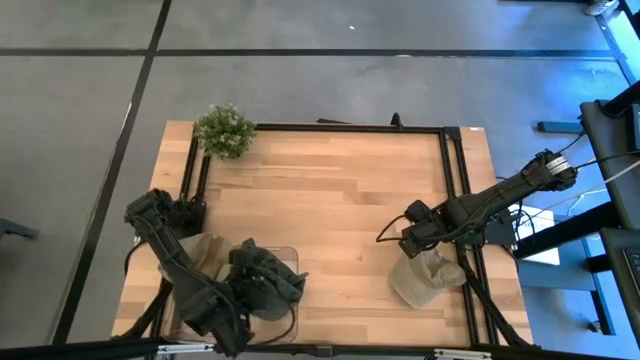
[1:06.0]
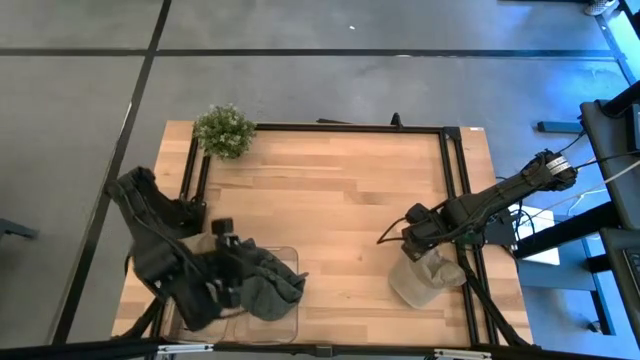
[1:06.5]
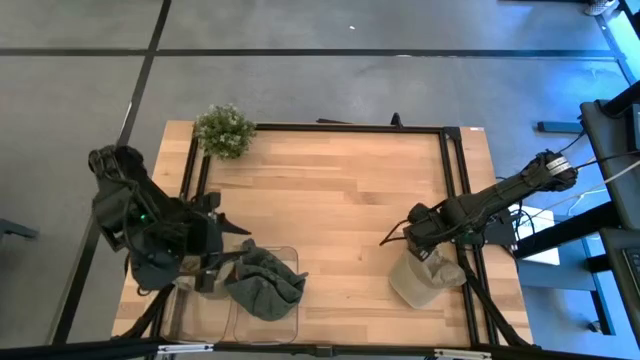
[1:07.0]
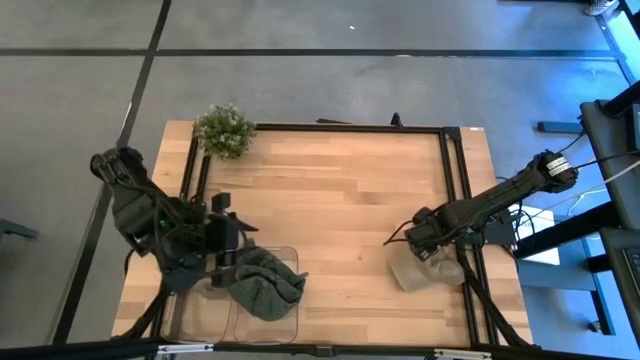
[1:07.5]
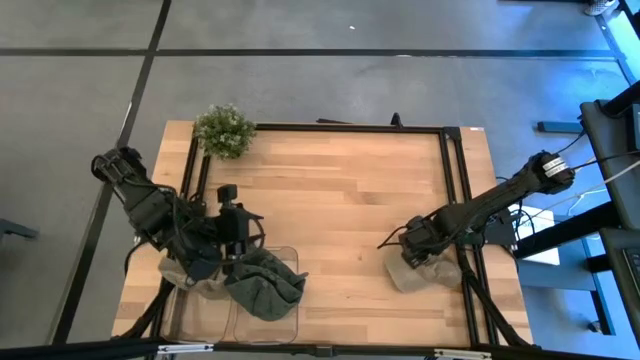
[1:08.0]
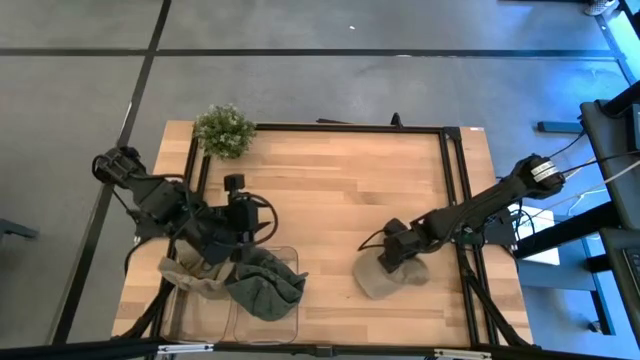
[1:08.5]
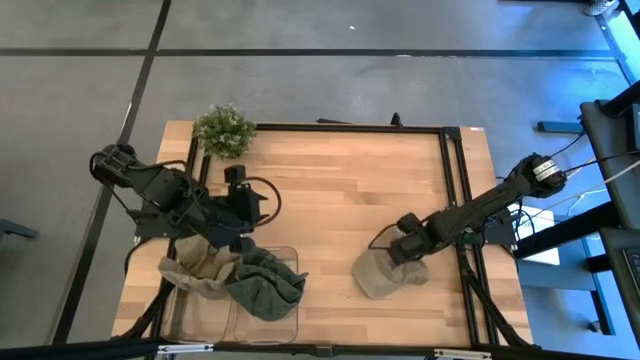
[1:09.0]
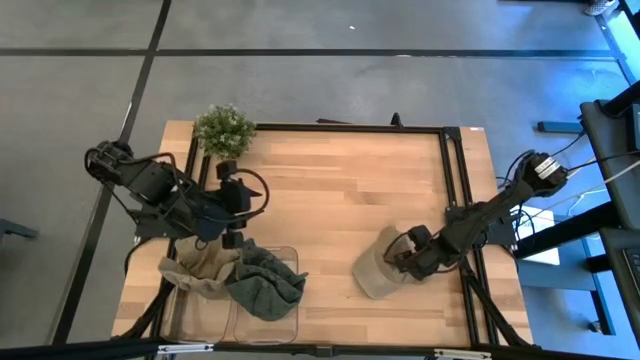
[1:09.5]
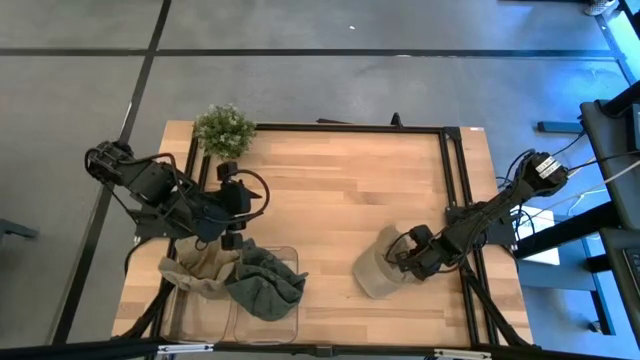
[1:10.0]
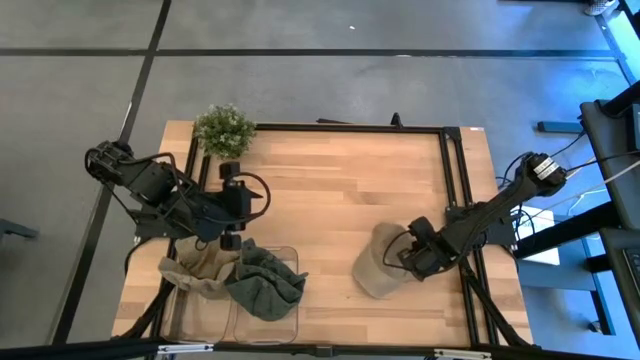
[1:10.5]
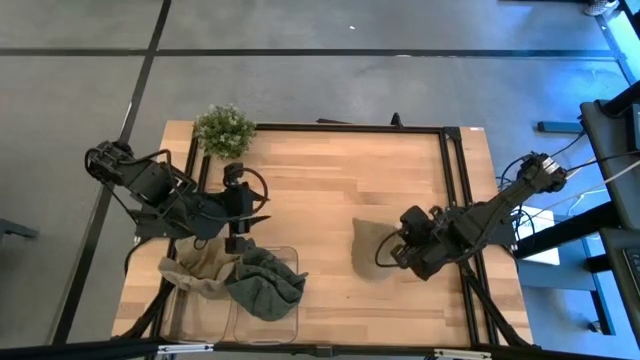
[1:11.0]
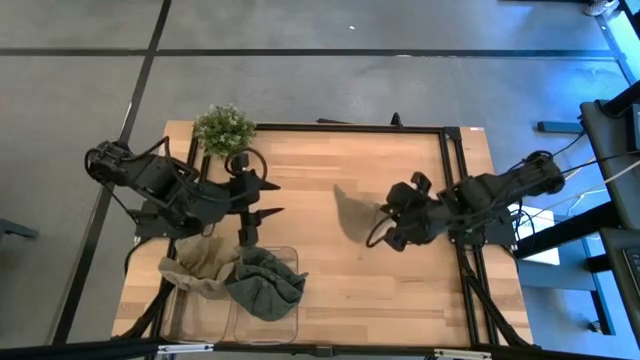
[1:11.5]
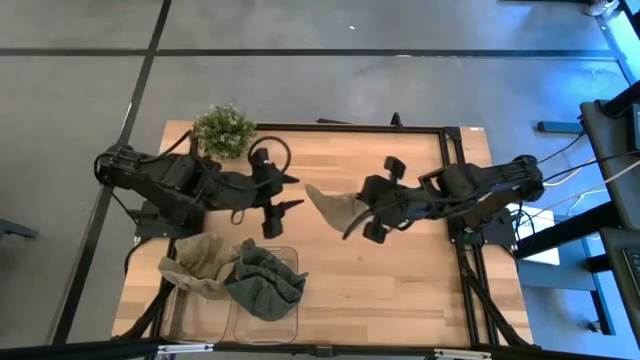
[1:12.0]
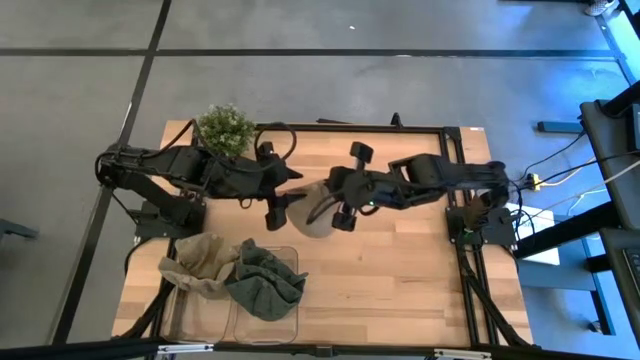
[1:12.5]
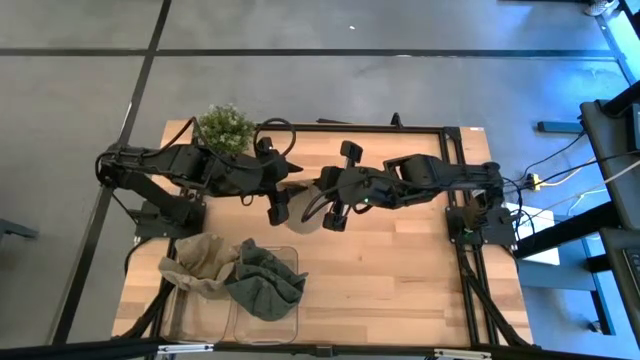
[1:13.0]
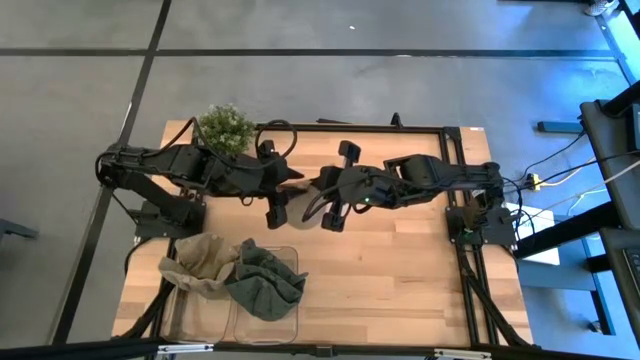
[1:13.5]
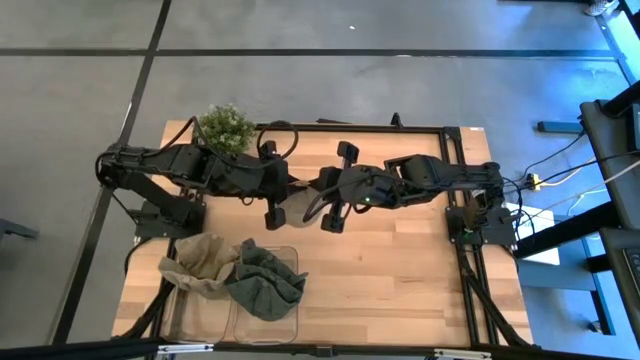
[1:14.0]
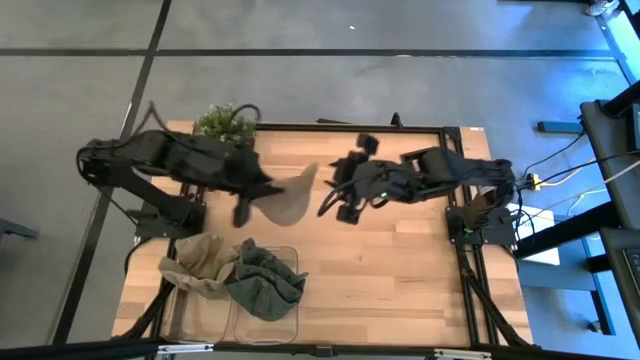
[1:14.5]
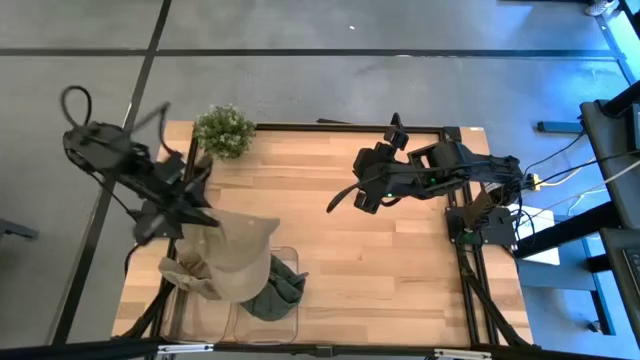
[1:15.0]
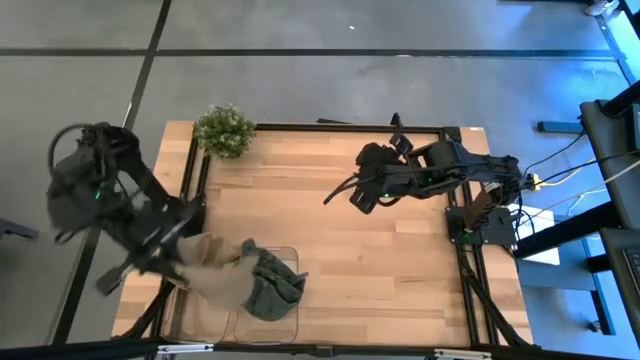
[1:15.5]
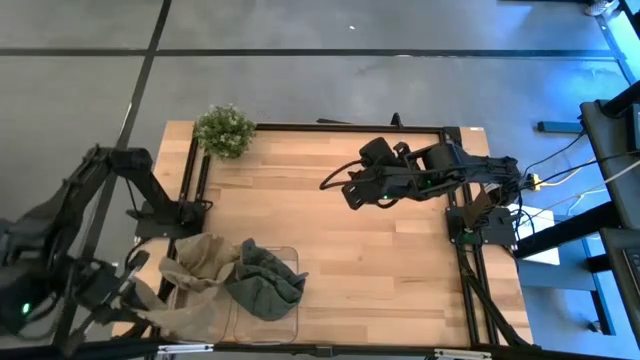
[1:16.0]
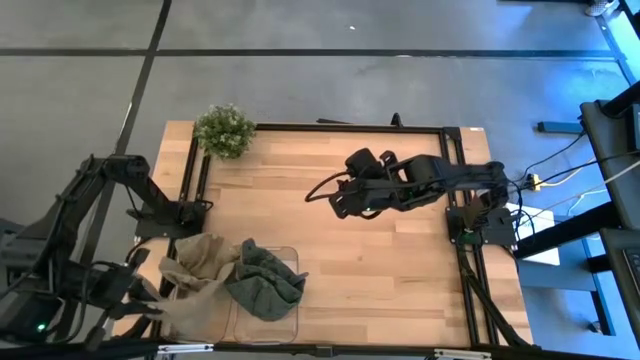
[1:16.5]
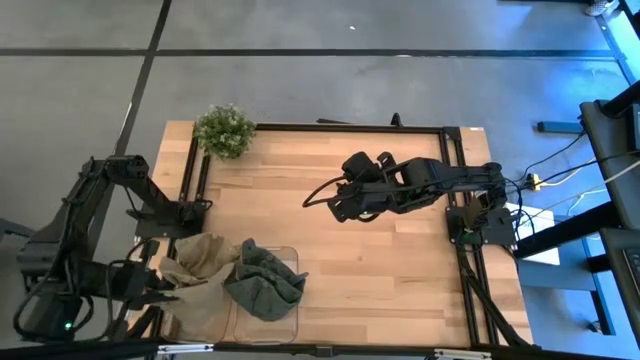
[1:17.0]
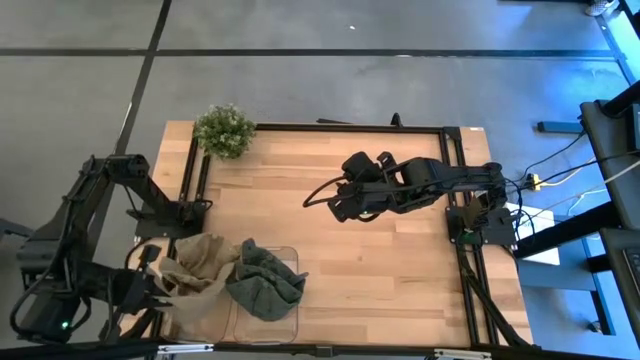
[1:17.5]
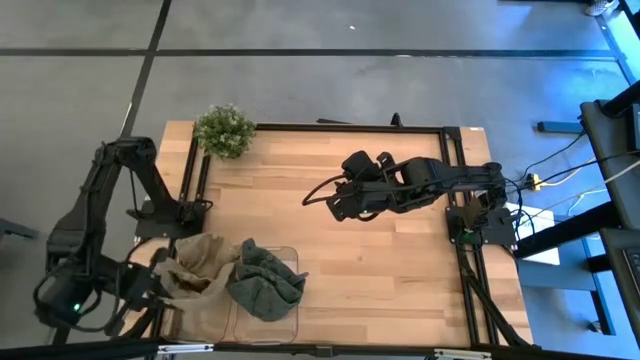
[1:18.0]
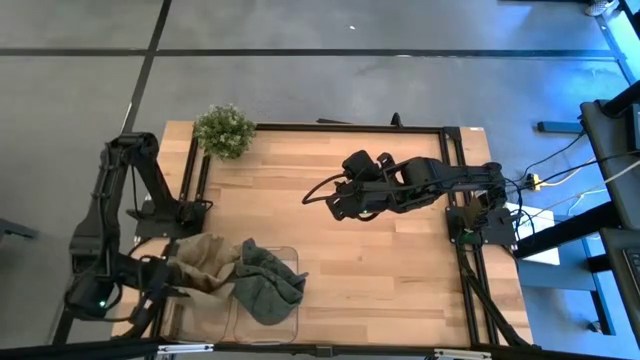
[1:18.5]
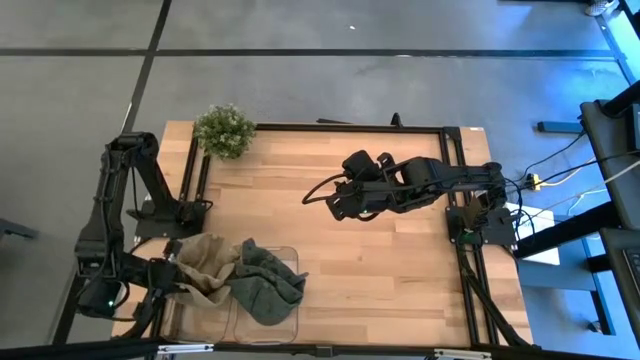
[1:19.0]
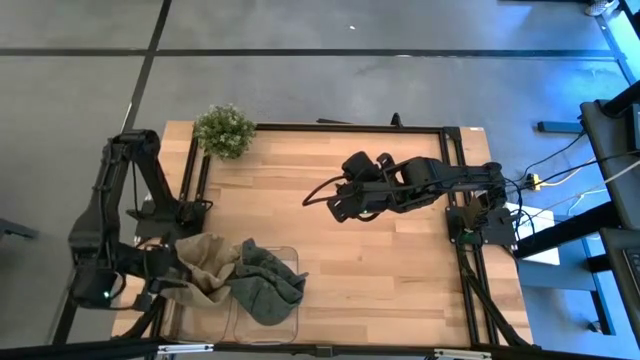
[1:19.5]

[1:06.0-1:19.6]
Task: Pick & Place hat
Put the brown cap into the left transparent bin

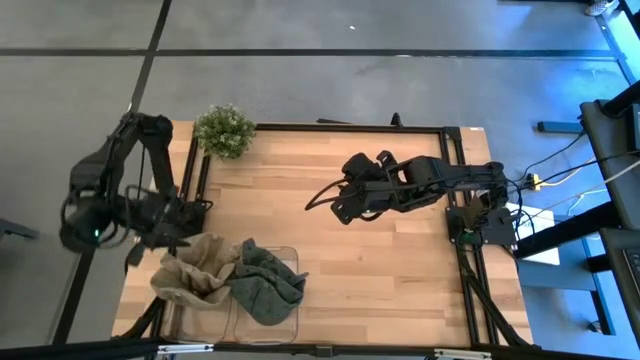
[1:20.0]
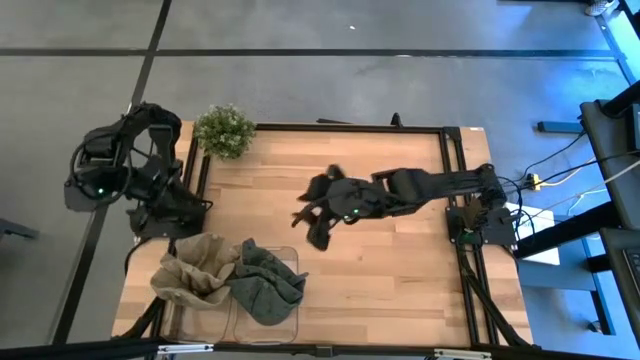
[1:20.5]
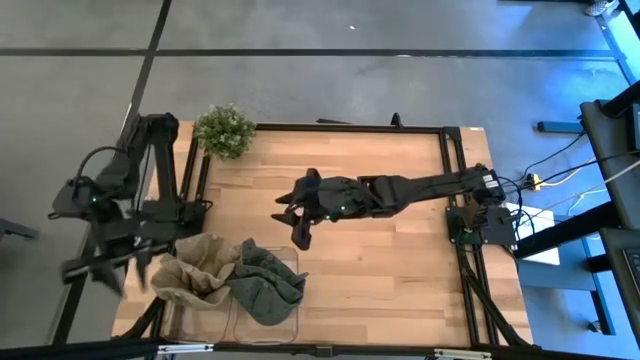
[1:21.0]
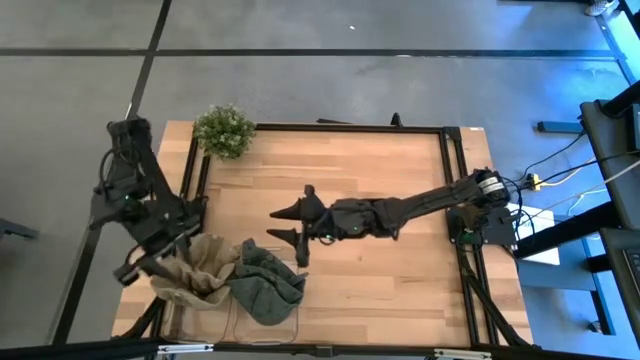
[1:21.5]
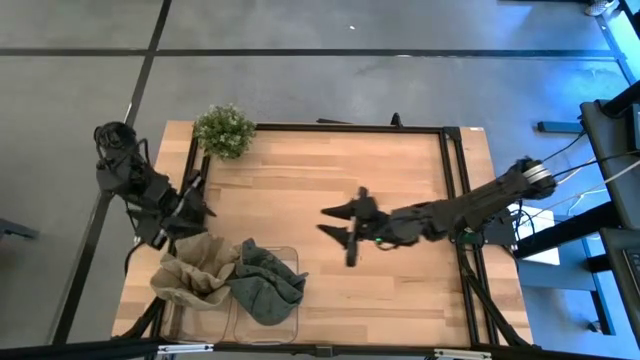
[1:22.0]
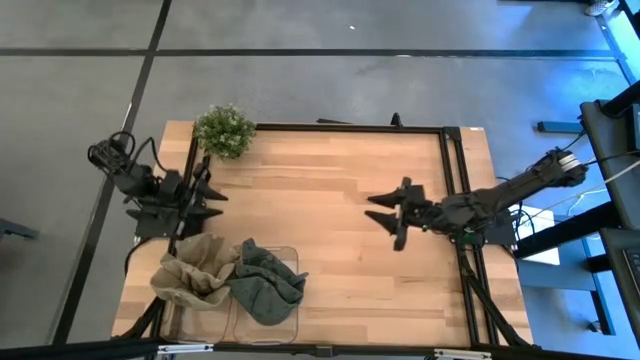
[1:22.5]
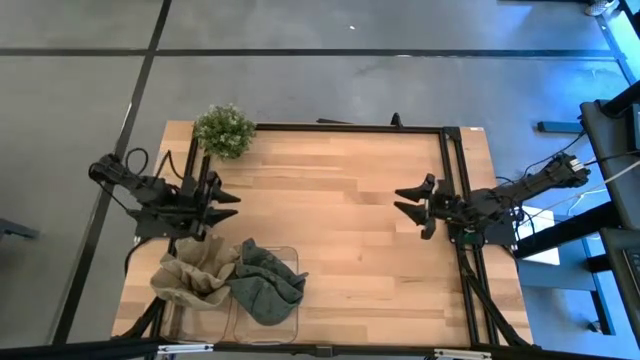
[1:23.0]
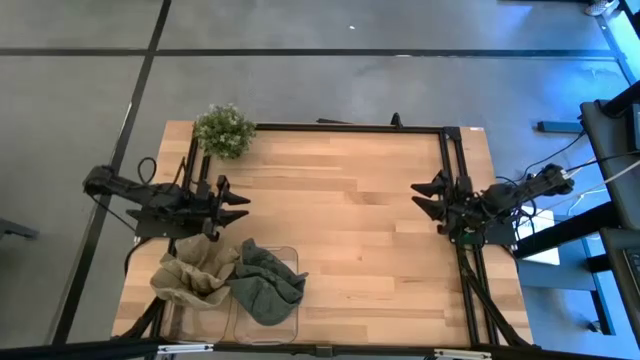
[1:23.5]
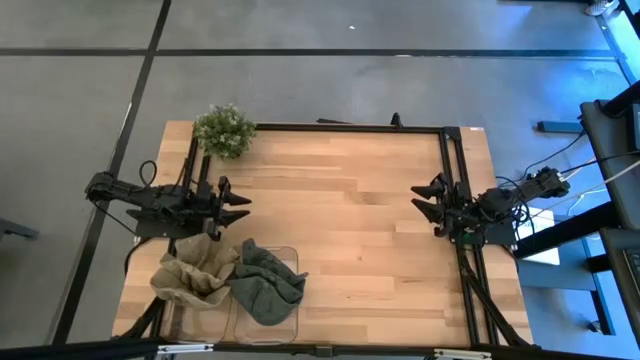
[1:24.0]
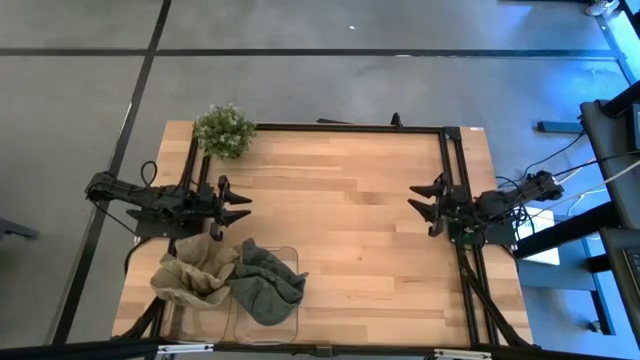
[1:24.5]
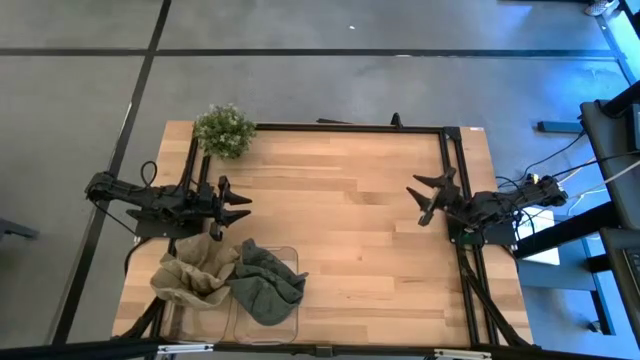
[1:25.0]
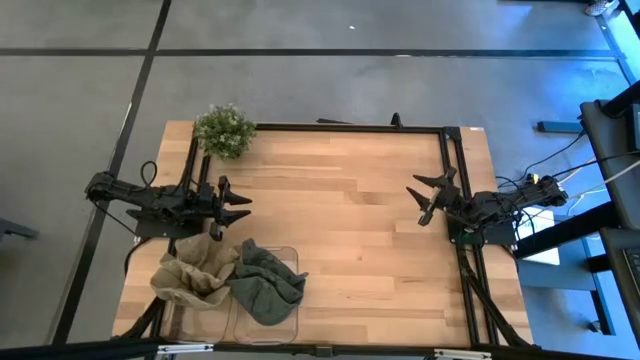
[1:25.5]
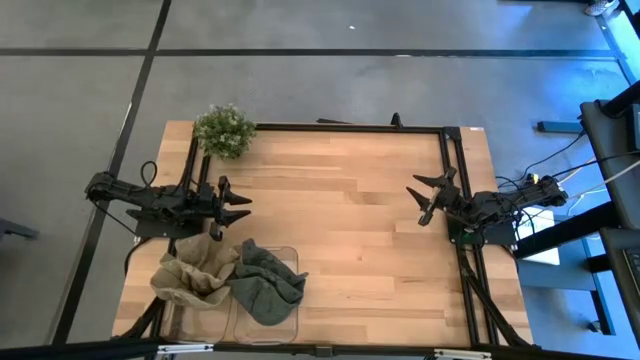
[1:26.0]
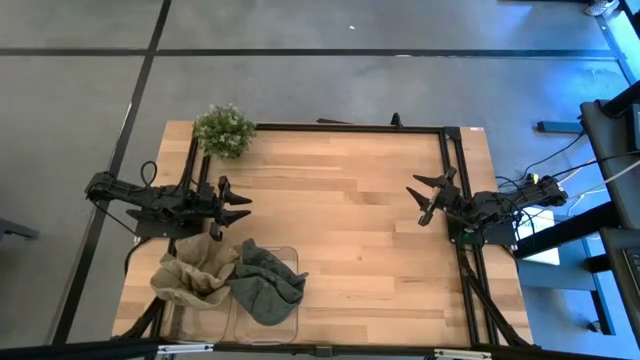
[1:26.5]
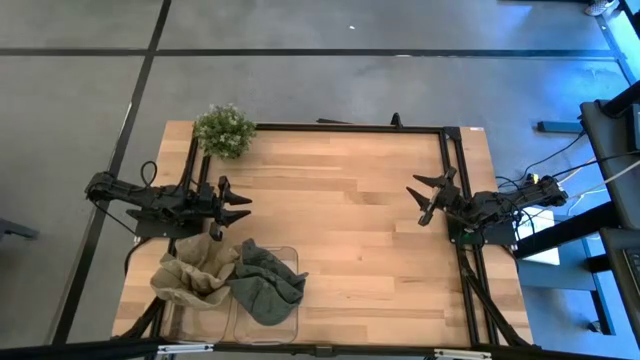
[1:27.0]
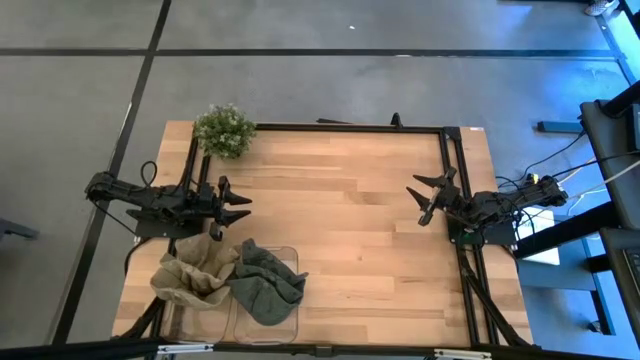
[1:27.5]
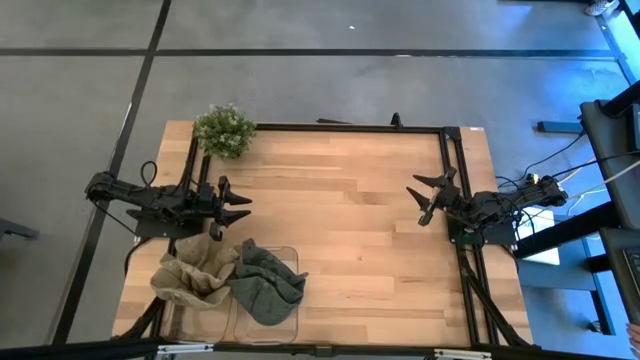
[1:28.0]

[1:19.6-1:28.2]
Return to Home Position
